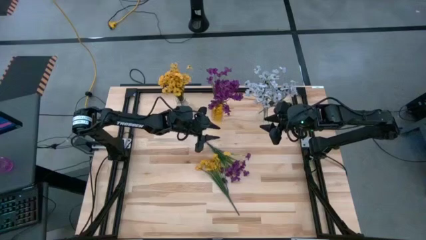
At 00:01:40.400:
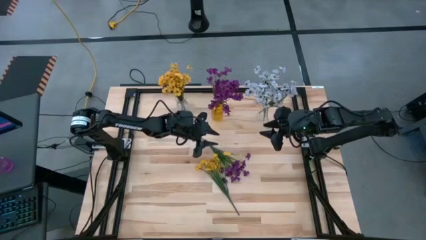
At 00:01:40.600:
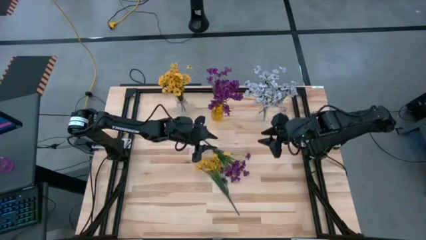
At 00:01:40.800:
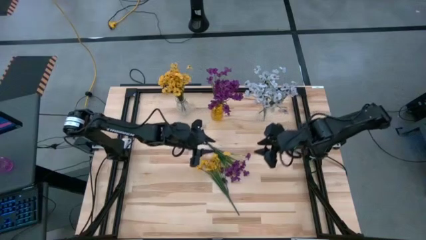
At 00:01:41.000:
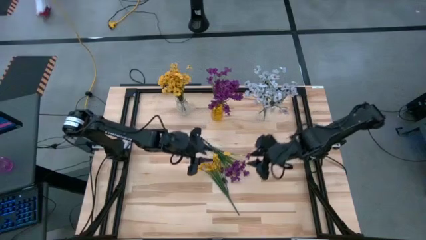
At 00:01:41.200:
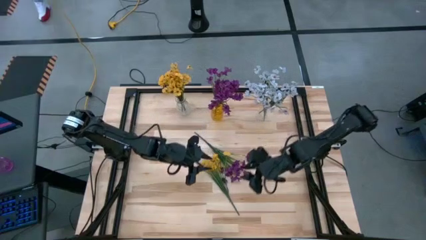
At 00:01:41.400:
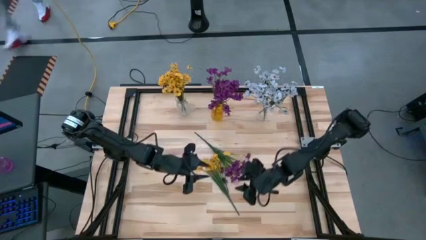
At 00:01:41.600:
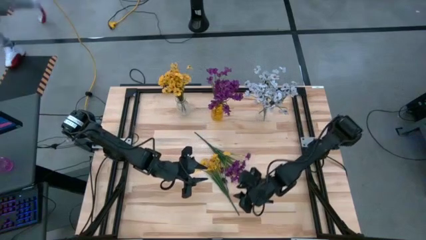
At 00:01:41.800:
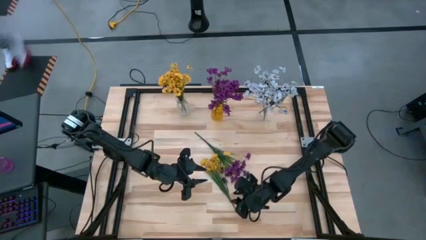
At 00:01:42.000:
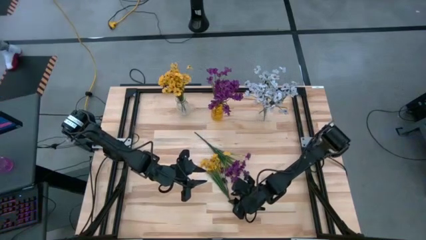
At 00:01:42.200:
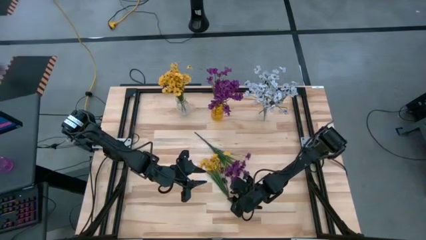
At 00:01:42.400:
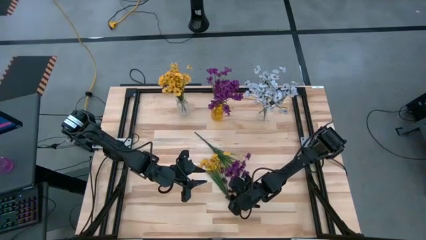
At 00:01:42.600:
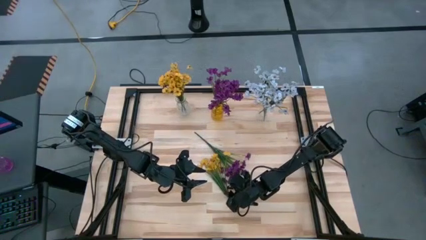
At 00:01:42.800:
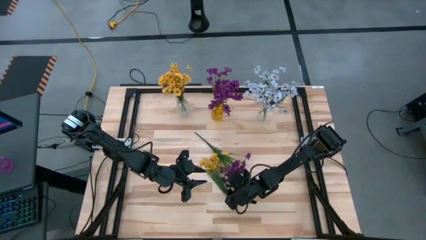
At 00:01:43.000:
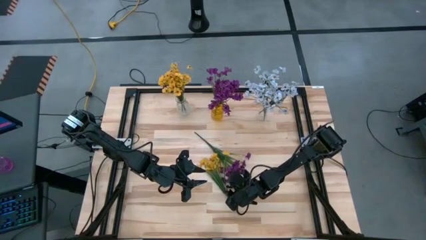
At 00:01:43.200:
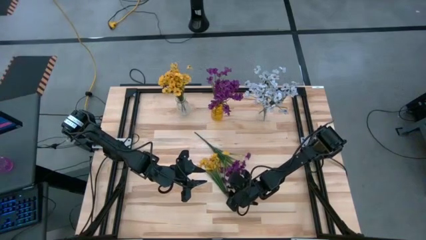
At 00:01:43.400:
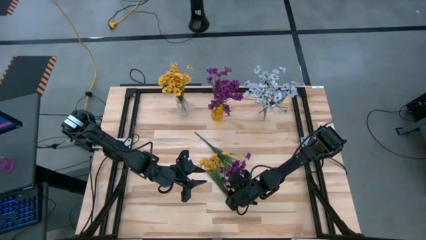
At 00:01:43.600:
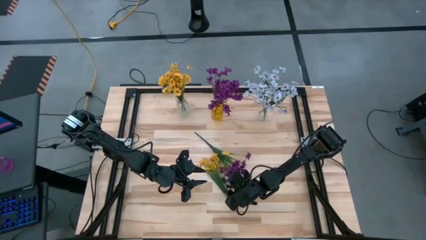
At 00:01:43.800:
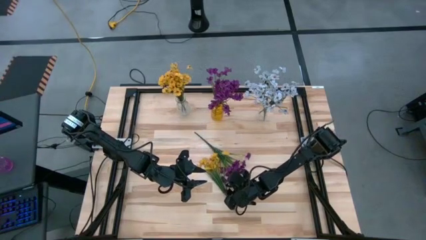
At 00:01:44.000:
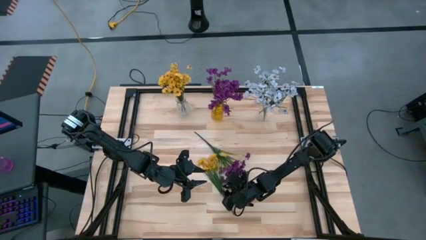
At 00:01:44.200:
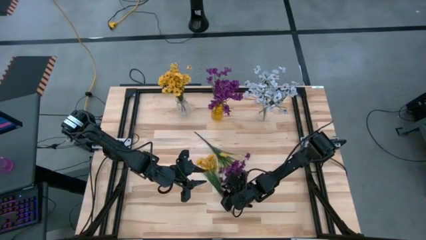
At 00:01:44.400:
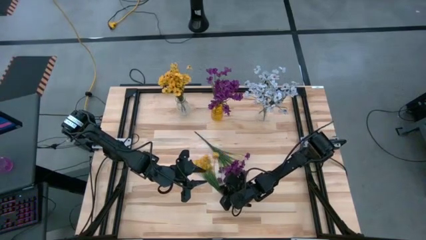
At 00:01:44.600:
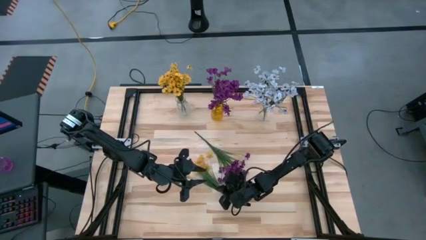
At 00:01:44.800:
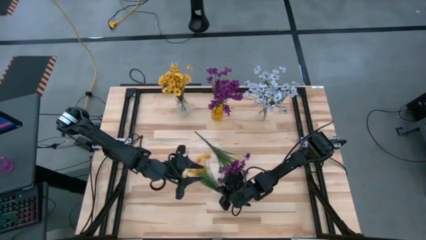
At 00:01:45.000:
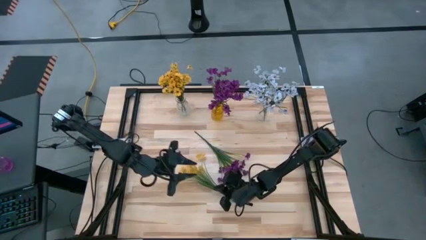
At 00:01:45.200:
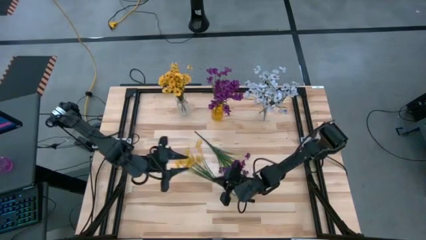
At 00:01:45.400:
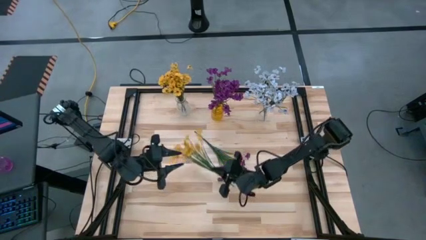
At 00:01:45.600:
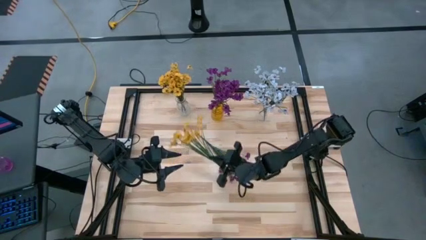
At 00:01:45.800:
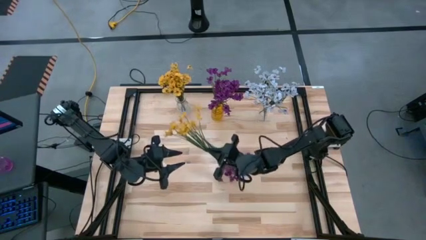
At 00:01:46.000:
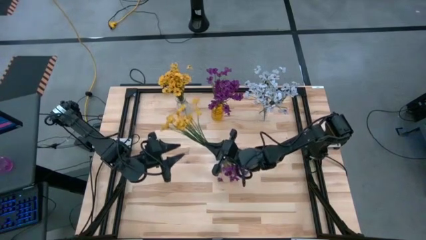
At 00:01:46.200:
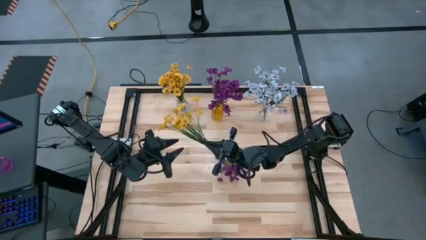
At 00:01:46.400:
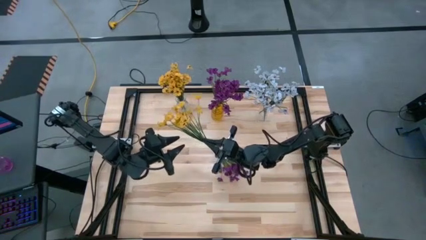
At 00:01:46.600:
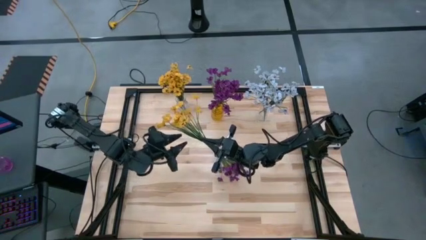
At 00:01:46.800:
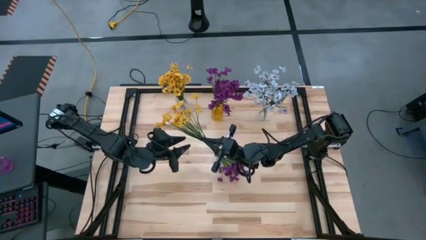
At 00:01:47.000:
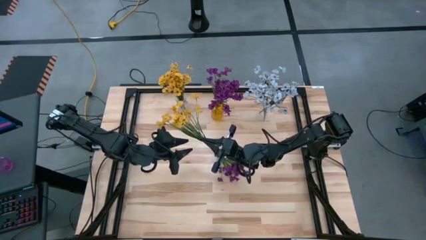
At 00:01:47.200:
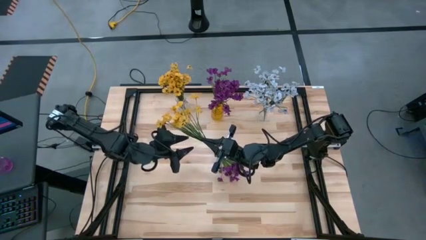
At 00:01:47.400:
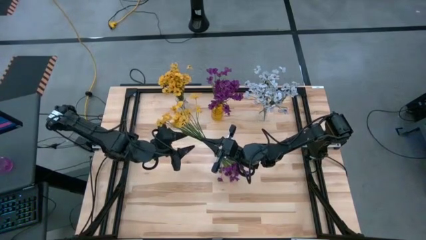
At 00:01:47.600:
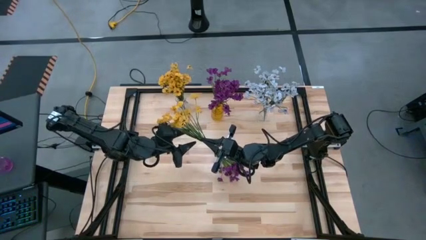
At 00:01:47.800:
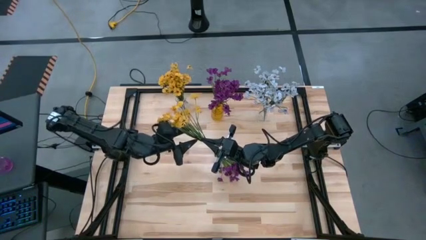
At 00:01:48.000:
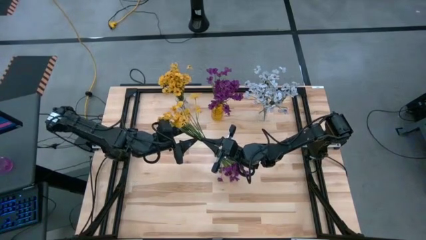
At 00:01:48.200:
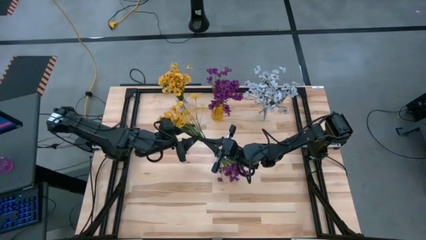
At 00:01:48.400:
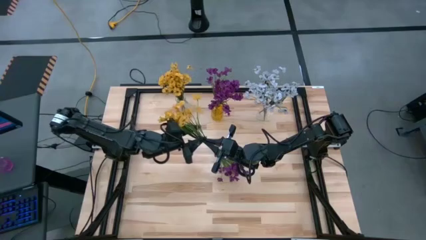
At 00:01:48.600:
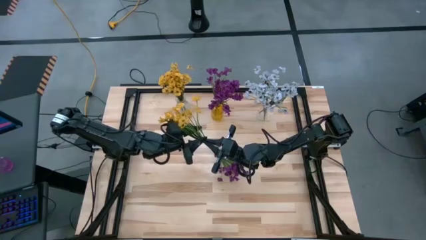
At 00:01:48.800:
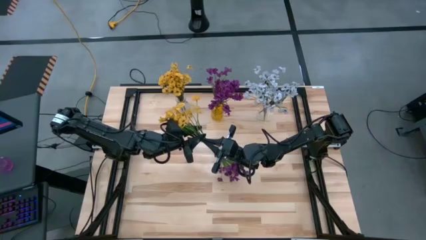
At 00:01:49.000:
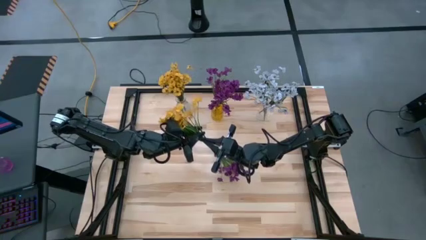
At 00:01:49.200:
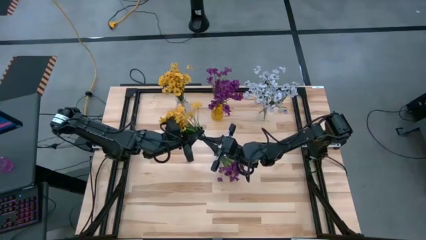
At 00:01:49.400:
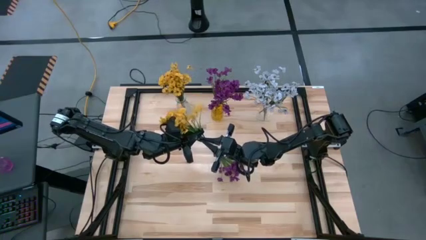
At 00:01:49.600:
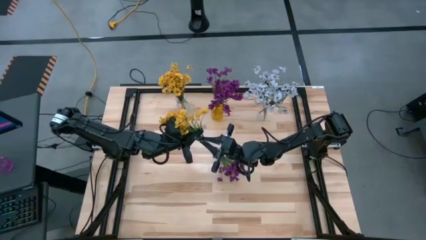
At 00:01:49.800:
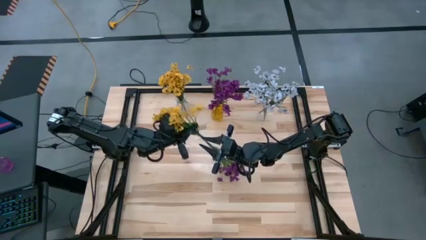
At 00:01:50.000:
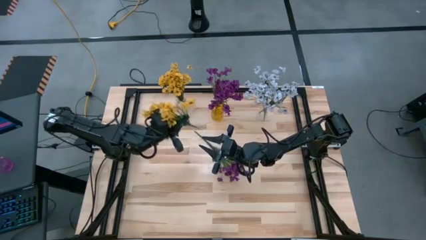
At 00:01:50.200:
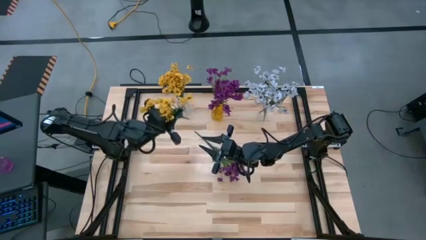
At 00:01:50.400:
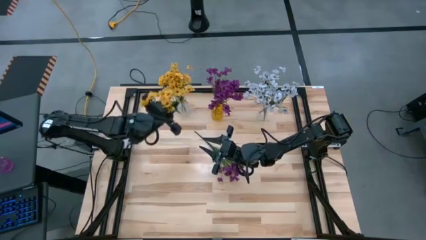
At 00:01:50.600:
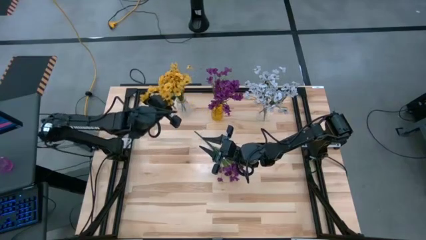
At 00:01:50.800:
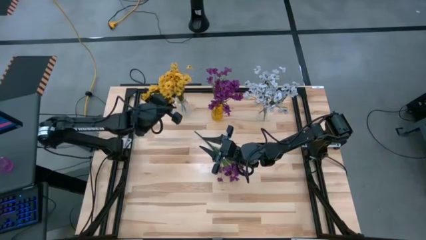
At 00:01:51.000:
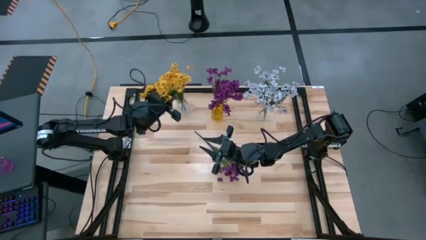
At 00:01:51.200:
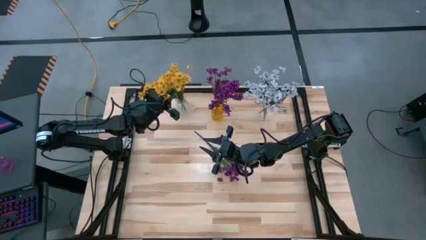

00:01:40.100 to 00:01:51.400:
Task: Sort flowers into vase by color
Put the yellow flowers into the left transparent vase
